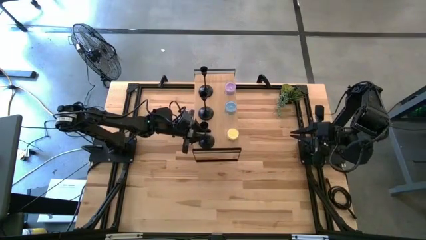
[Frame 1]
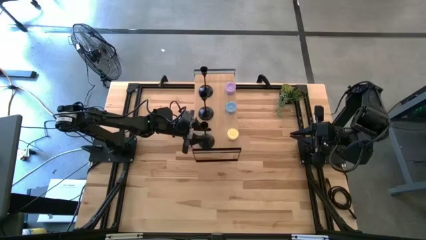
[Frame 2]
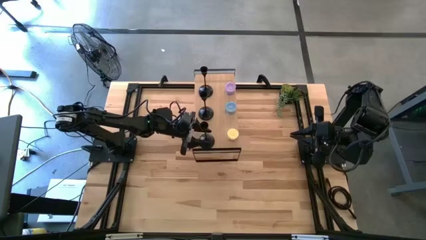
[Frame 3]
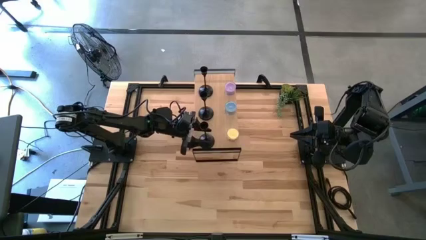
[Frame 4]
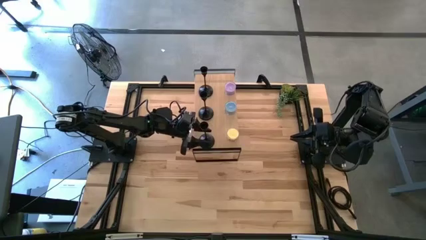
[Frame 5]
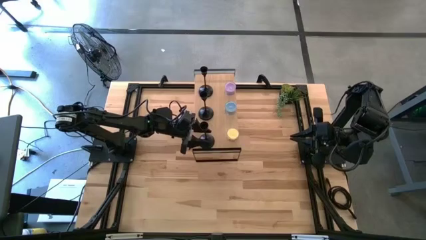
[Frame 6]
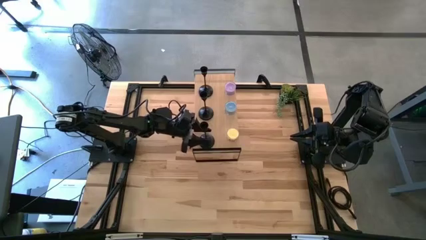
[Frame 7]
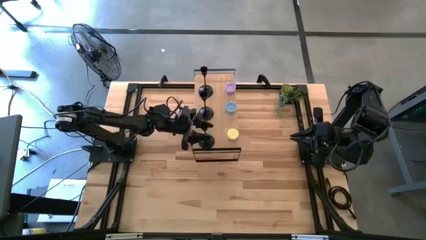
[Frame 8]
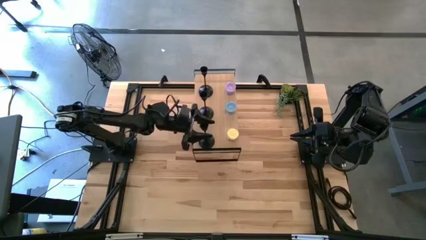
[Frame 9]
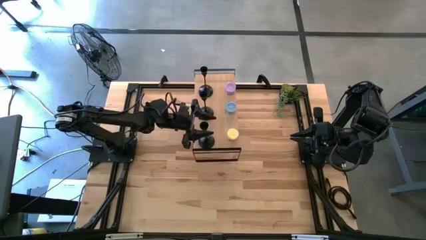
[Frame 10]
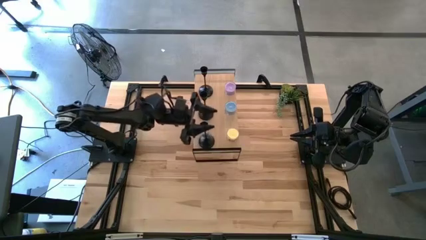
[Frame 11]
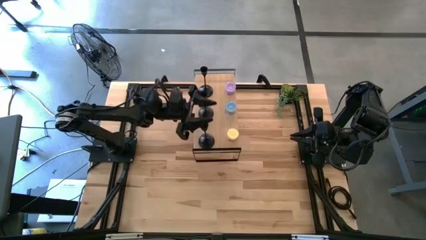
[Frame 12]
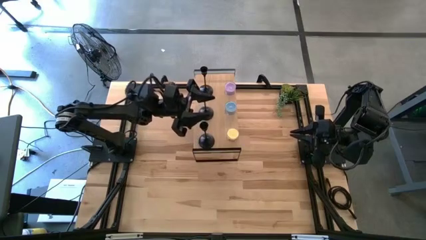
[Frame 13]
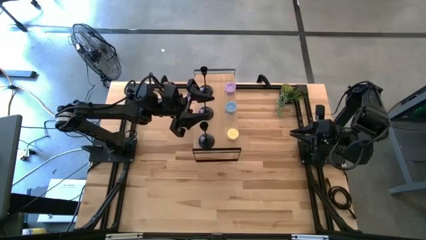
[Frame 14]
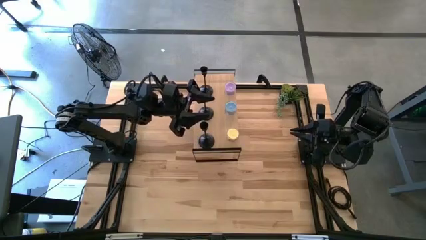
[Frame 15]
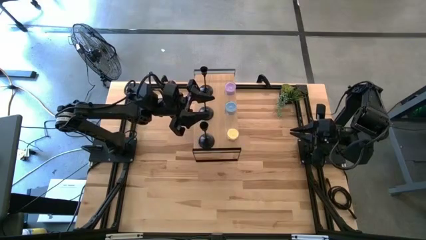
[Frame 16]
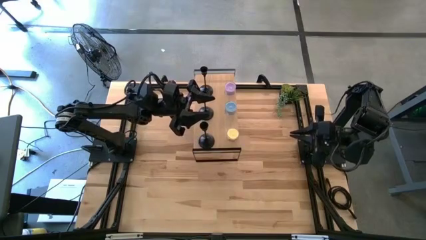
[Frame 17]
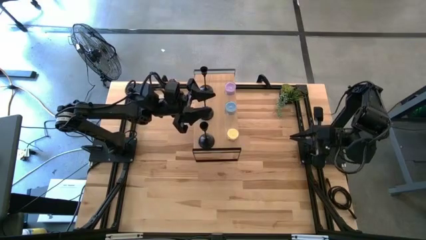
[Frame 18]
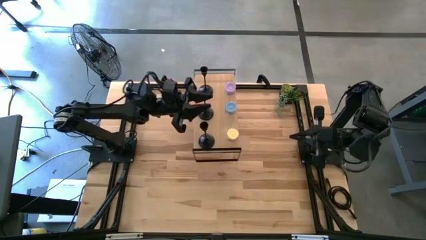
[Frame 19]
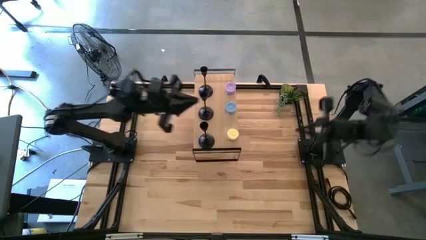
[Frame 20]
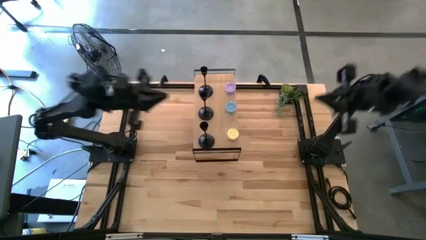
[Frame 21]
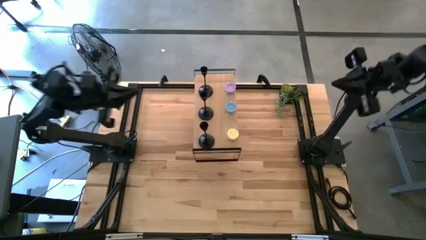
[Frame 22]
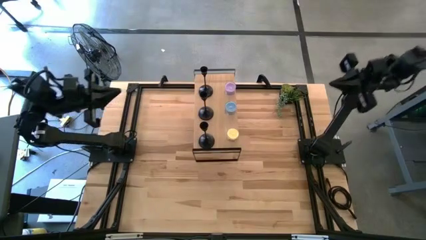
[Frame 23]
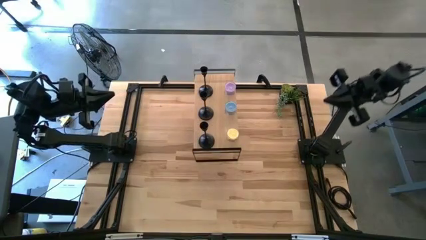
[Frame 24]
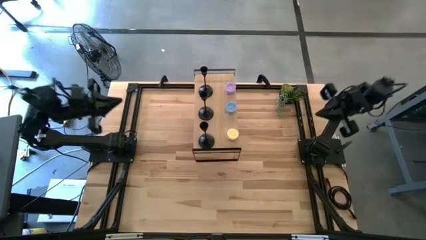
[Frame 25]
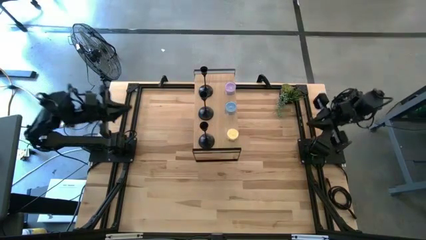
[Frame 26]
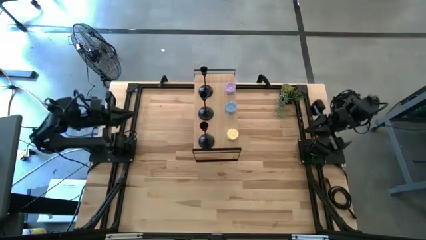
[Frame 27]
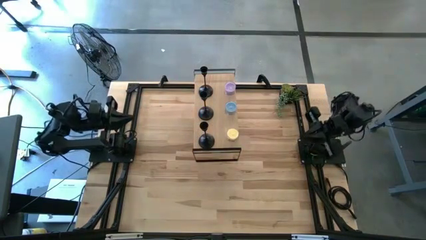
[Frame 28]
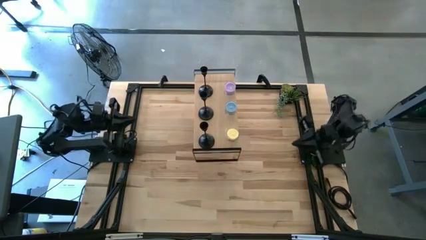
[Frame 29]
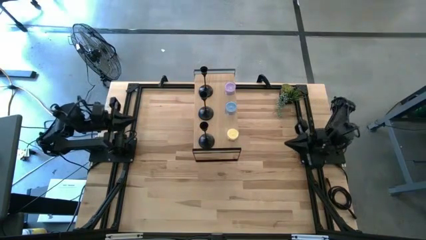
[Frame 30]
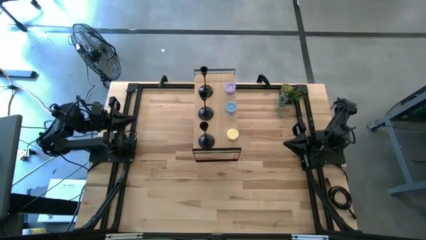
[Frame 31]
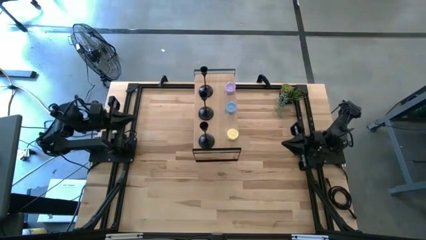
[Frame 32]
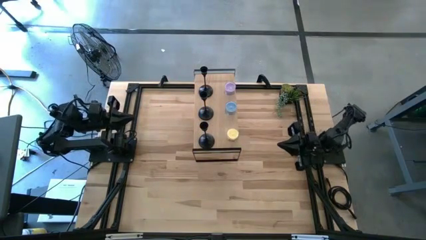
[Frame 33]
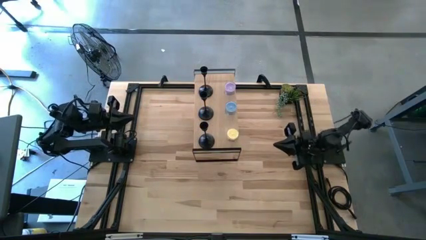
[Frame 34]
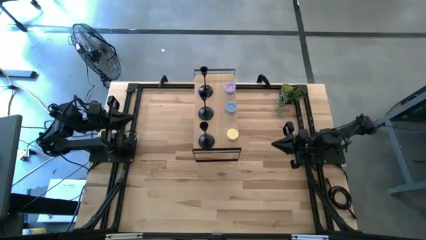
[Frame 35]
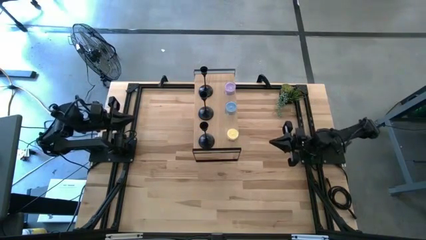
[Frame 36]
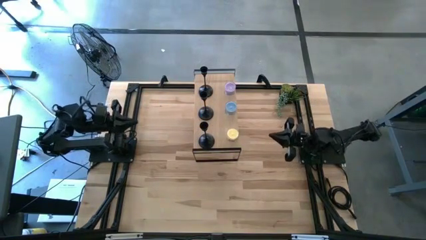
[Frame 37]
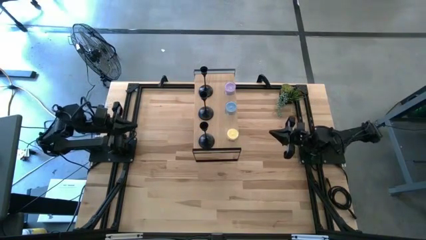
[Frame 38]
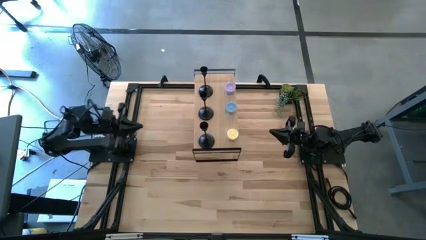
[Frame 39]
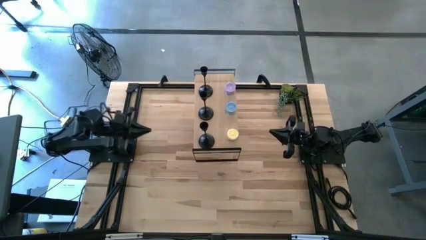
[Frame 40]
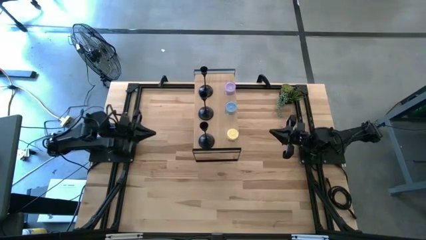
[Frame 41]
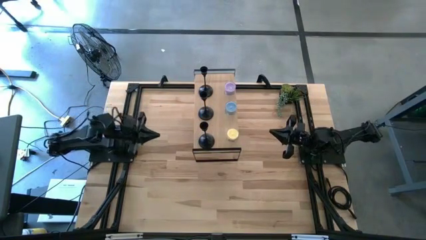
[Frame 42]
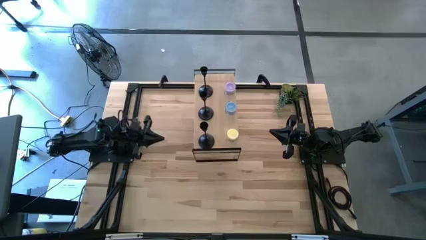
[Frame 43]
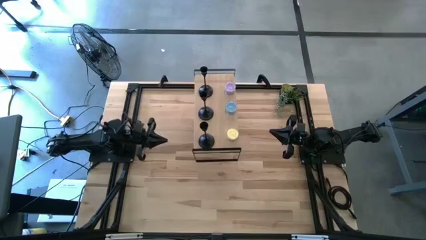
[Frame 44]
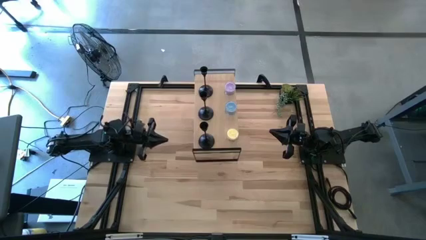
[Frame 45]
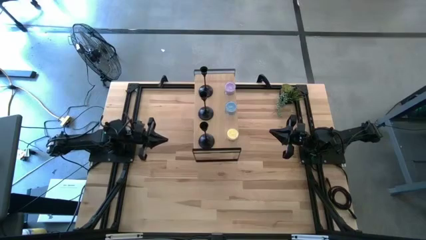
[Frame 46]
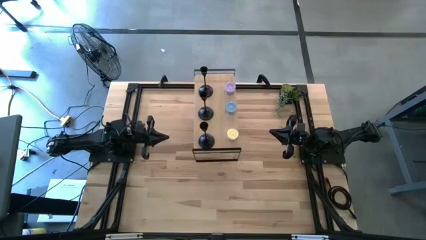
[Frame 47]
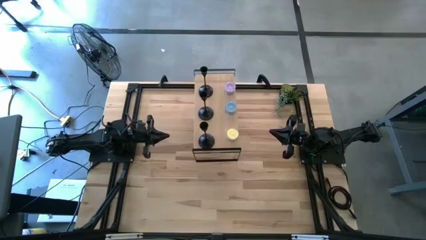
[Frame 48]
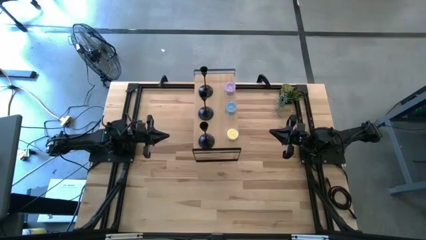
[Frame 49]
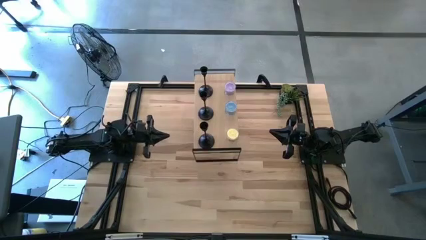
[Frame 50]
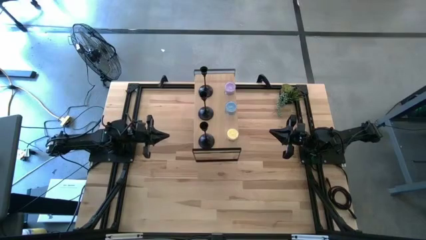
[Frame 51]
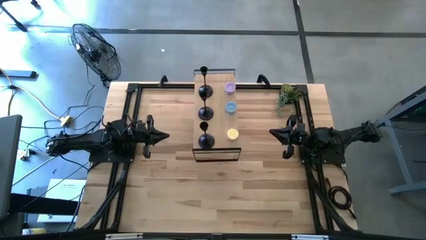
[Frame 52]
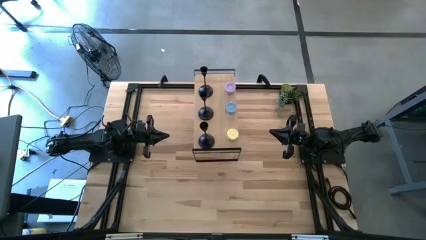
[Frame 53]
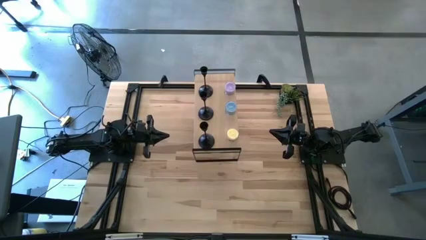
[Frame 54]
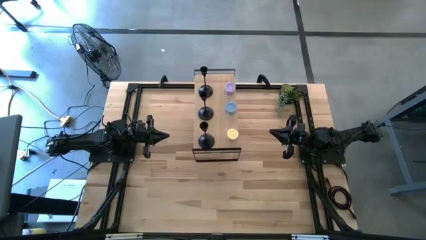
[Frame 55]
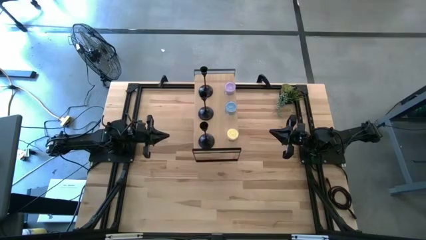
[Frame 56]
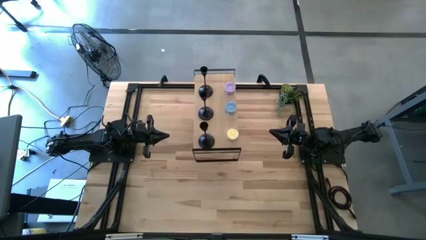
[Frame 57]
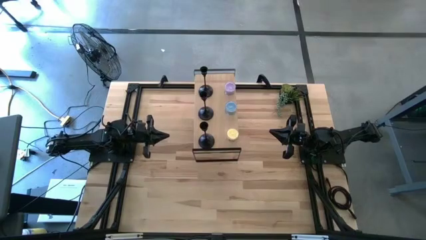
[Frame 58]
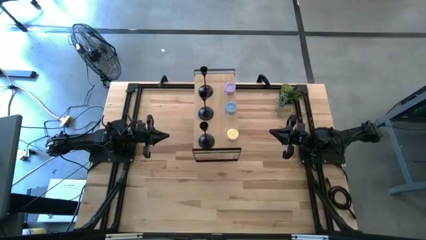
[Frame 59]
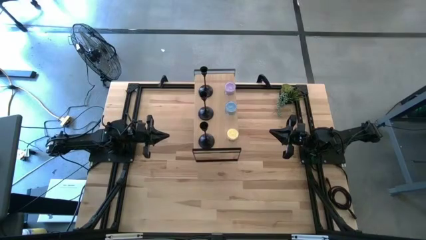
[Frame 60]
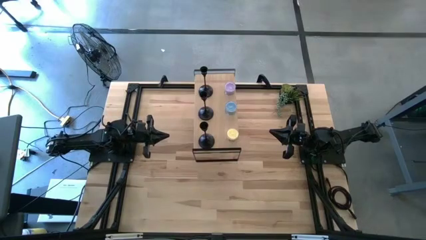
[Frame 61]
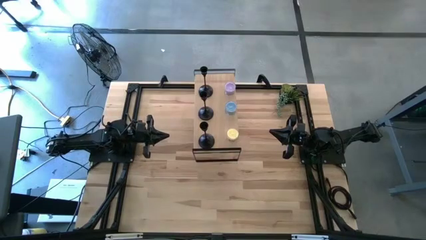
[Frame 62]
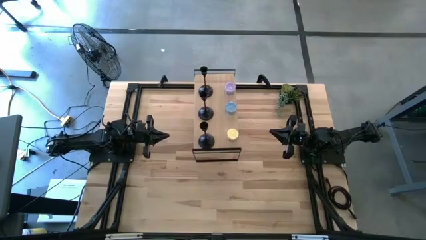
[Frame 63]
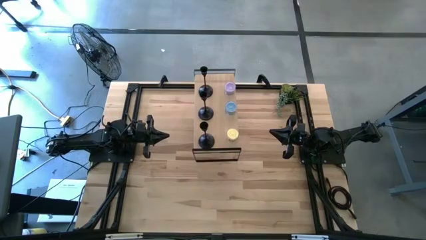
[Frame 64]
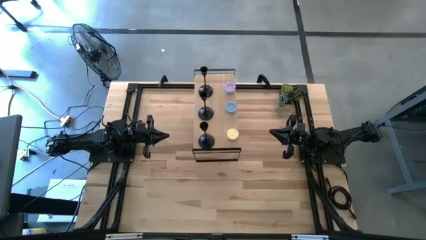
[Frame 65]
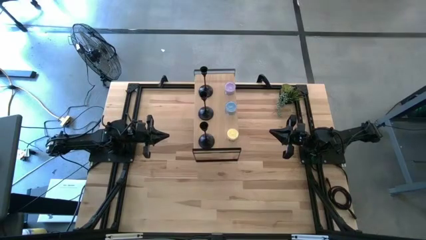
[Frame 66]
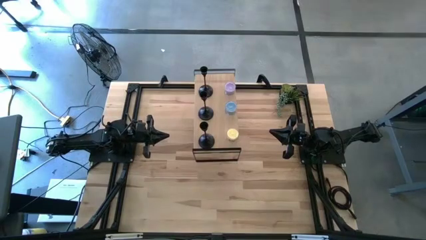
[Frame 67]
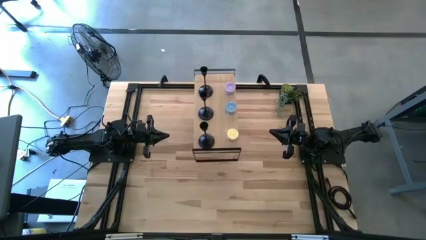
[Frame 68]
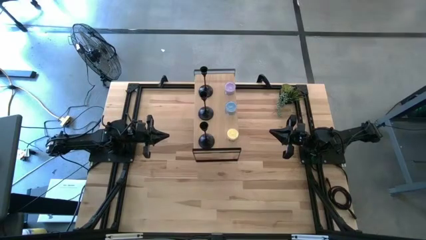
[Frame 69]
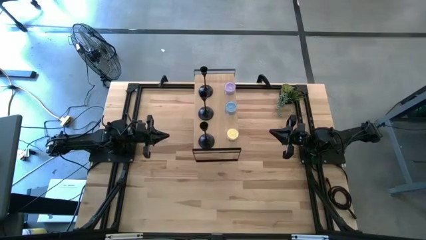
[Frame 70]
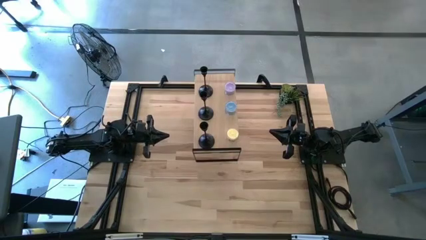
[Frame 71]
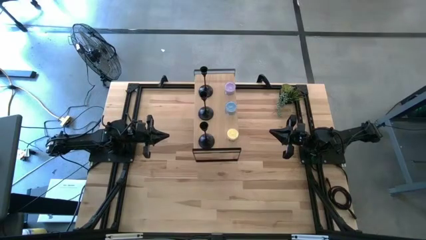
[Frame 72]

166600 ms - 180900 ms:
Task: Pick & Place candle stick holders
Return to Home Position
